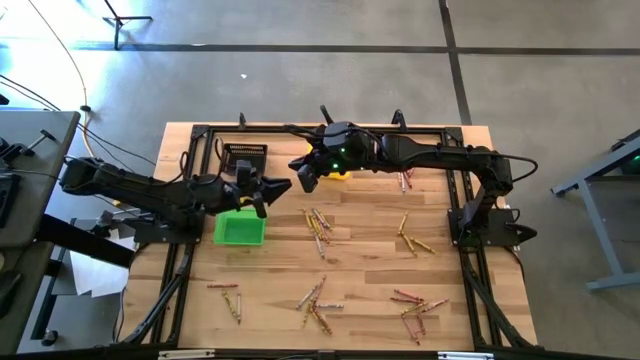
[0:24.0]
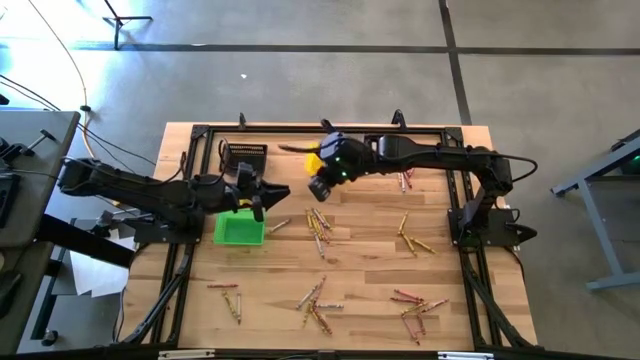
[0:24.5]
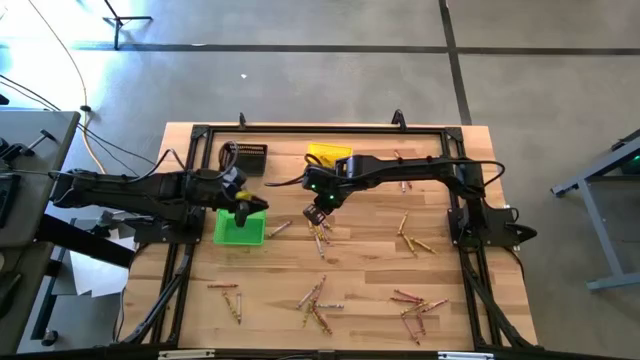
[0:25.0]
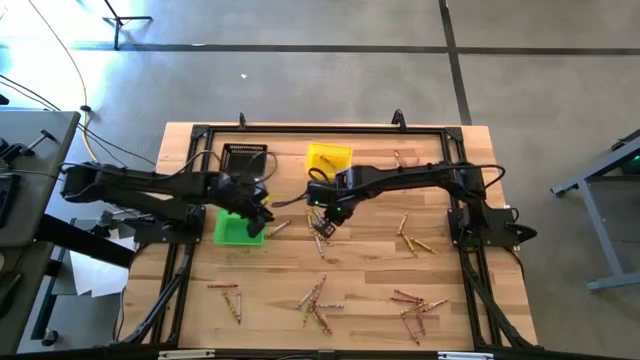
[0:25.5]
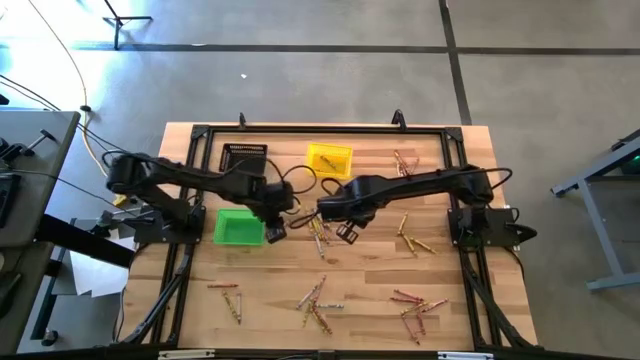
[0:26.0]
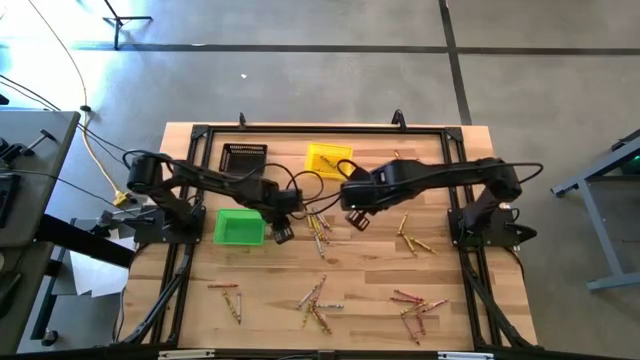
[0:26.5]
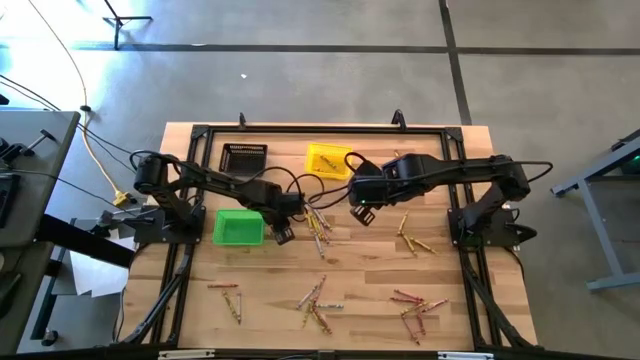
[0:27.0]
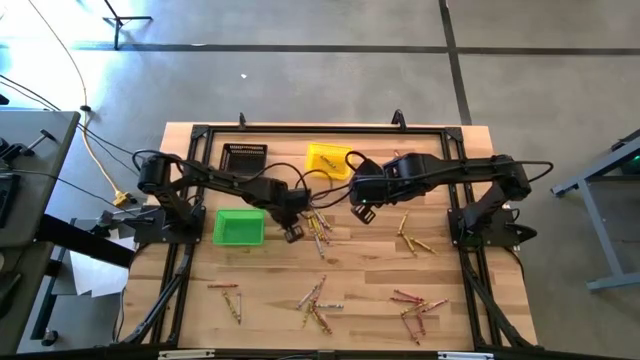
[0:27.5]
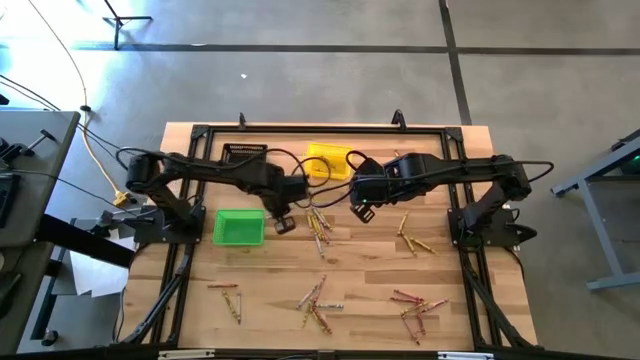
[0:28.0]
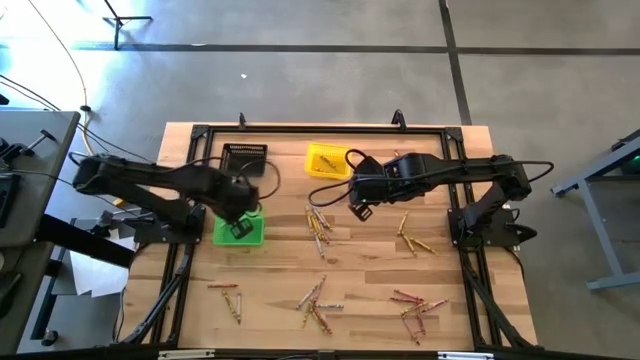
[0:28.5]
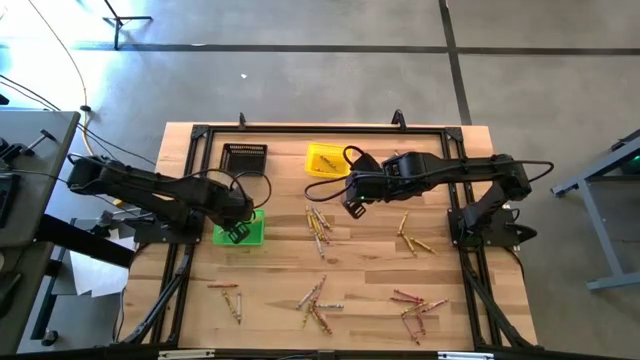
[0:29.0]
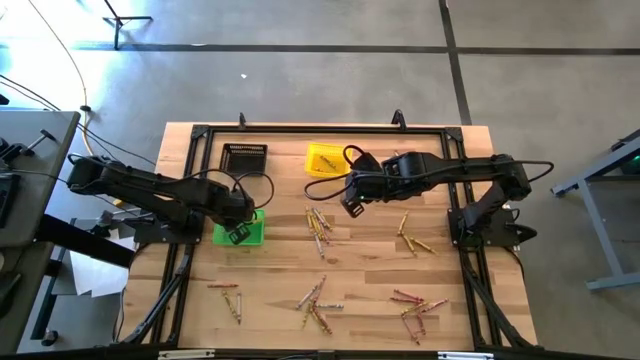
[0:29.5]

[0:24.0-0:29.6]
Task: Sort crayons
Put the blue crayon into the green bin

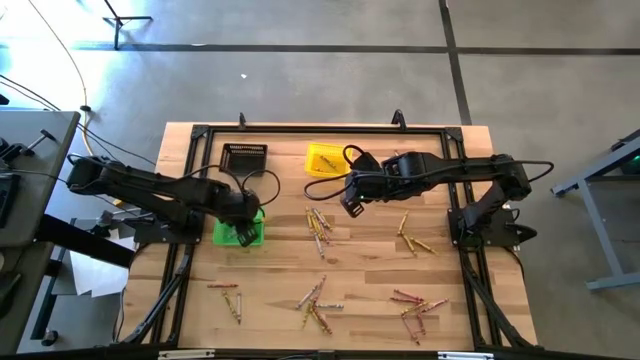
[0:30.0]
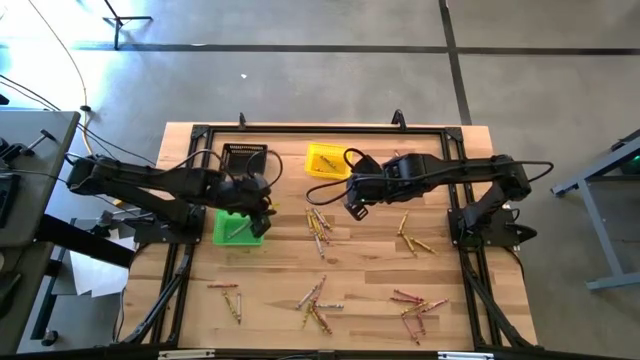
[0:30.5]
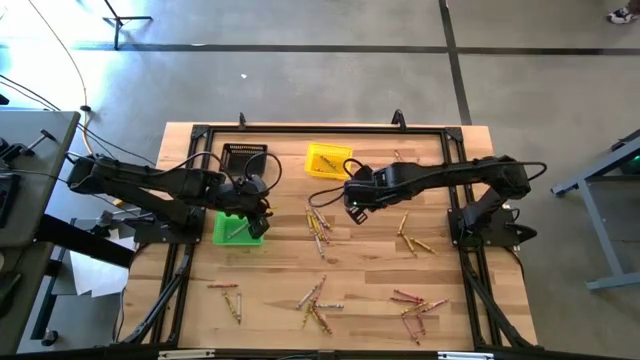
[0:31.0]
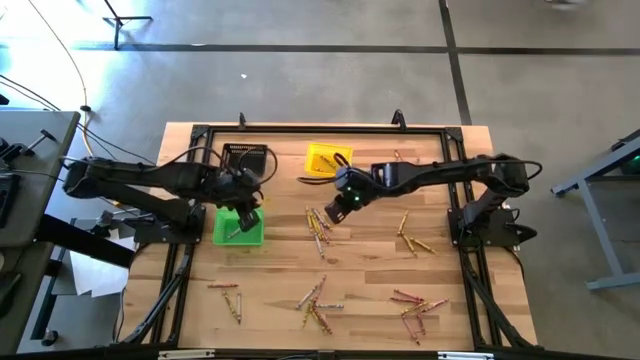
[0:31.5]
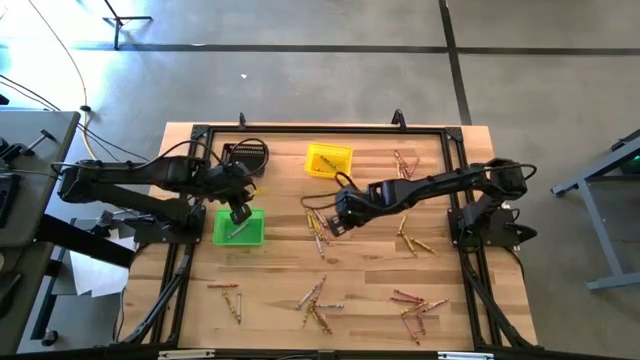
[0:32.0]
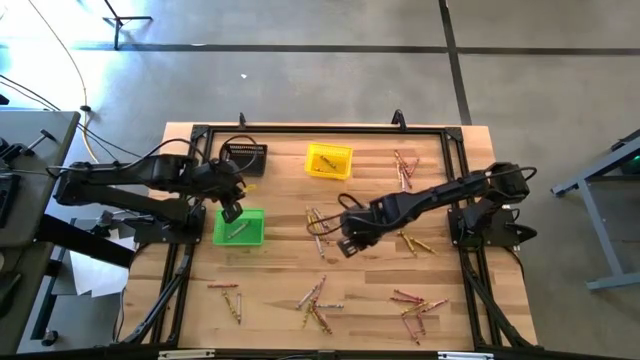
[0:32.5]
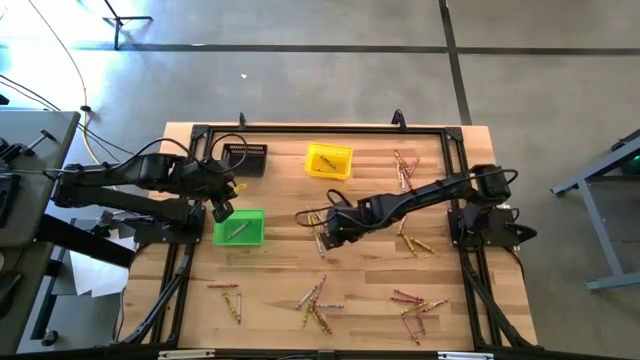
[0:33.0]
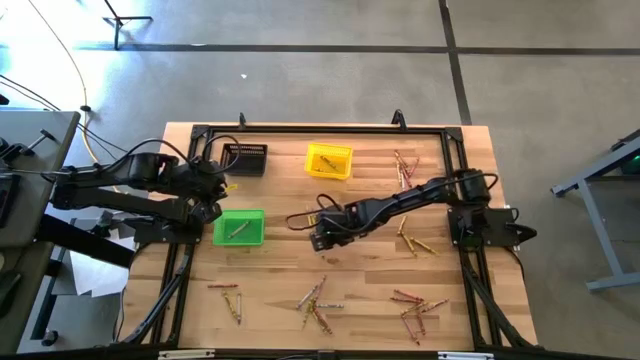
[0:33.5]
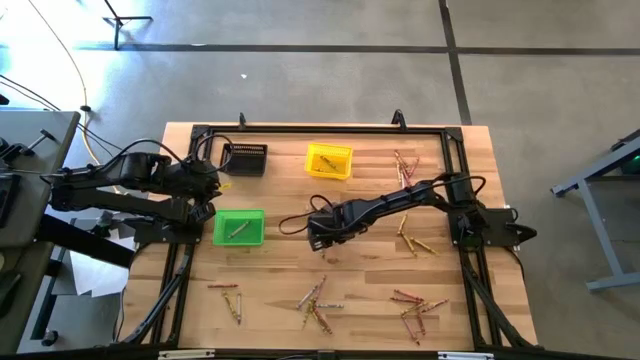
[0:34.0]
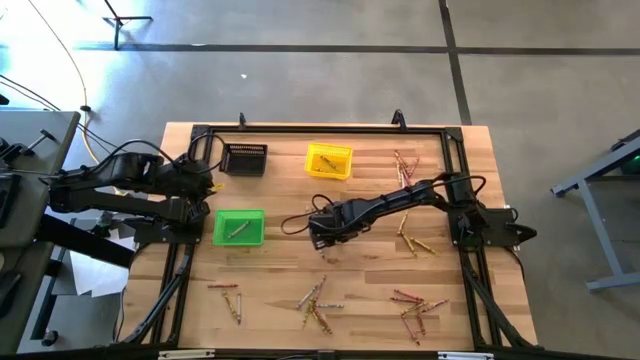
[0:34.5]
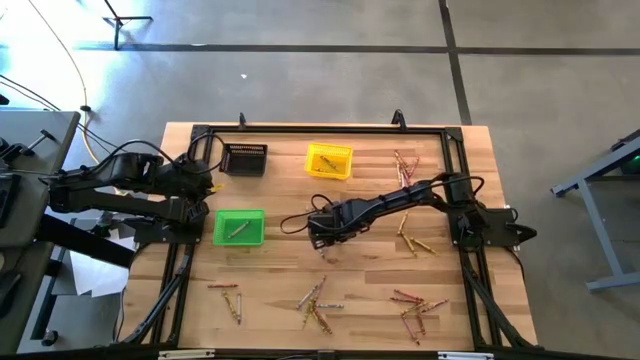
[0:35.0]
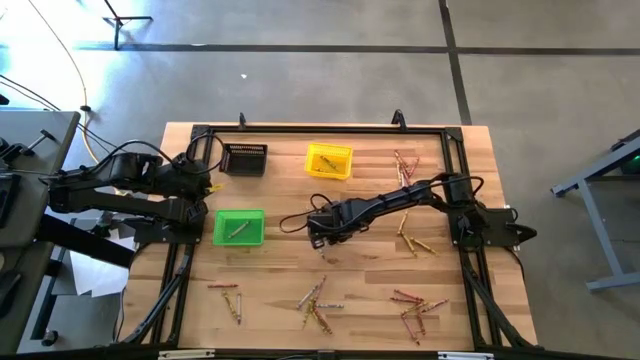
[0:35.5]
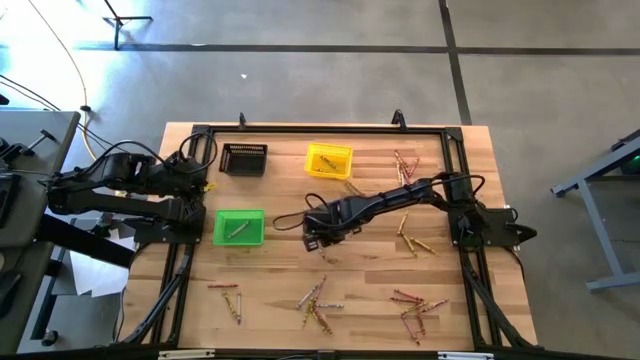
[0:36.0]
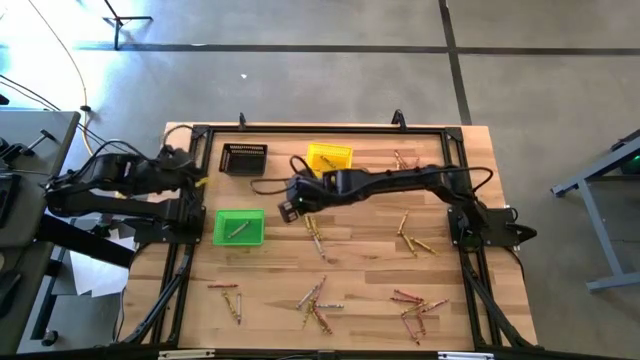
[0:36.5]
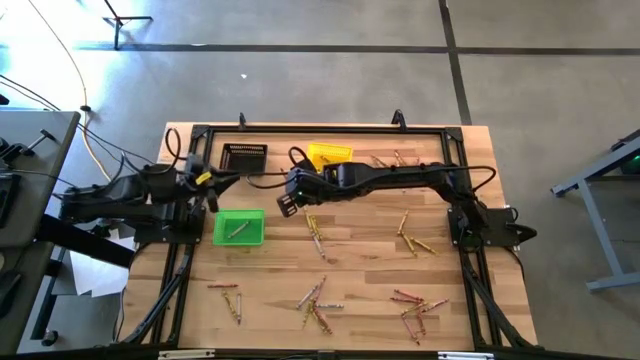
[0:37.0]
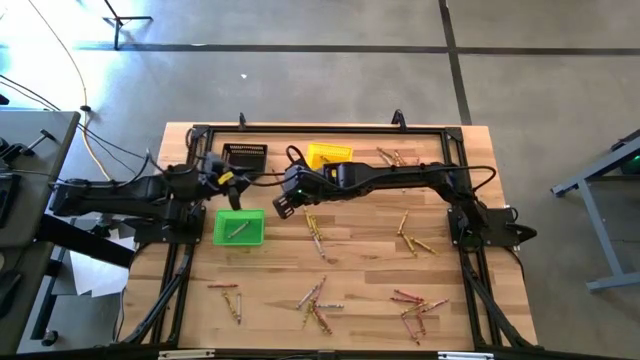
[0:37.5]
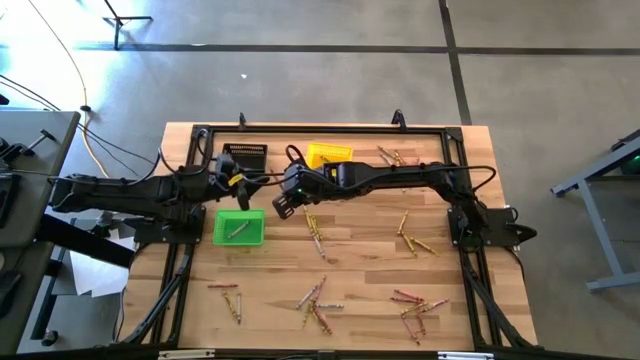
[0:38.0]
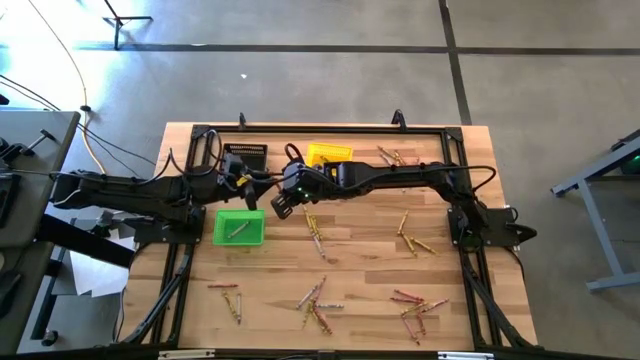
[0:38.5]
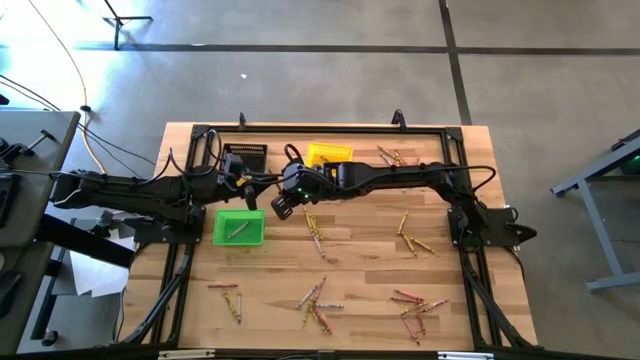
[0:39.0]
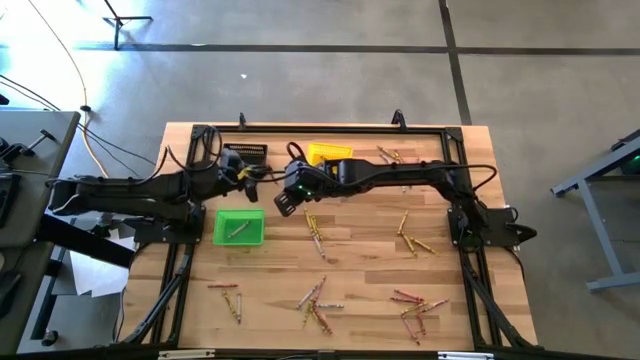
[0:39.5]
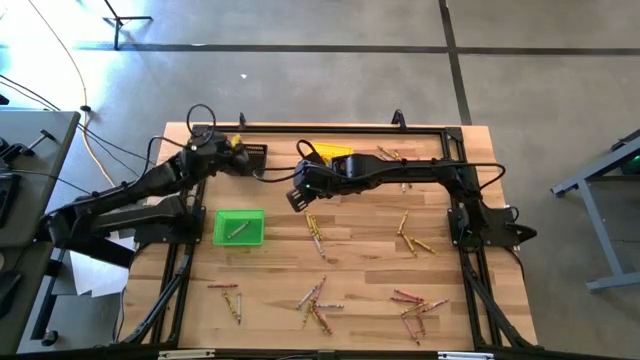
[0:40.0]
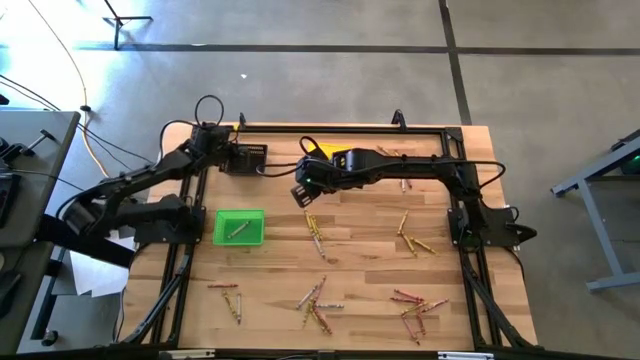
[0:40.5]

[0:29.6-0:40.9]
Put the red crayon into the black bin
